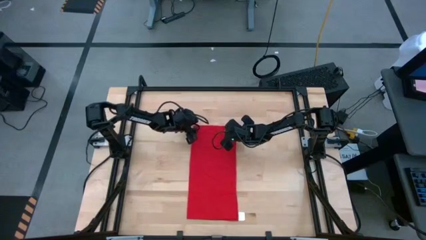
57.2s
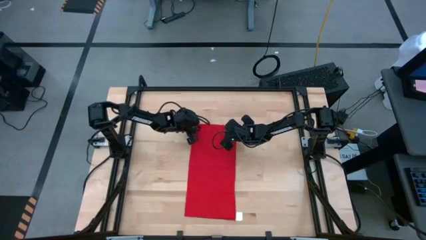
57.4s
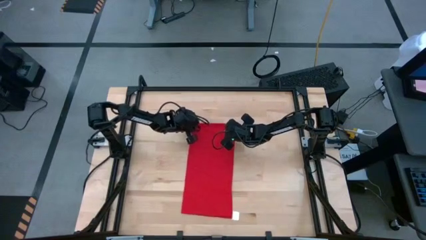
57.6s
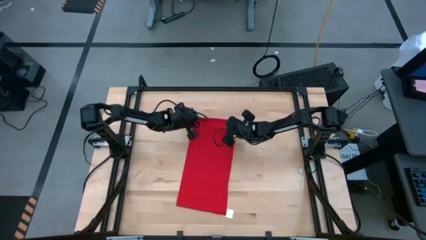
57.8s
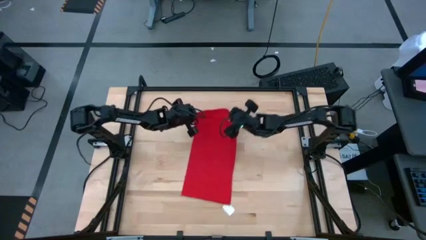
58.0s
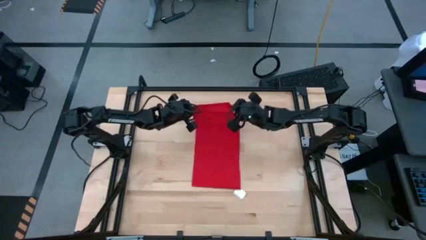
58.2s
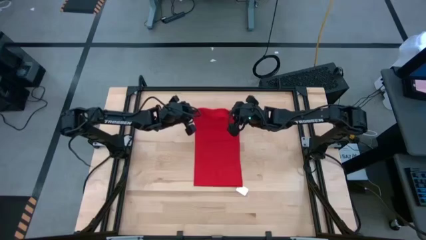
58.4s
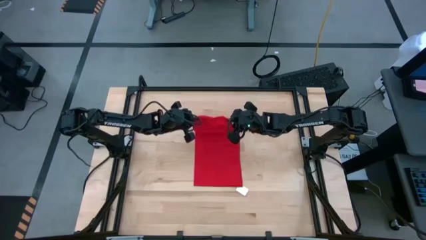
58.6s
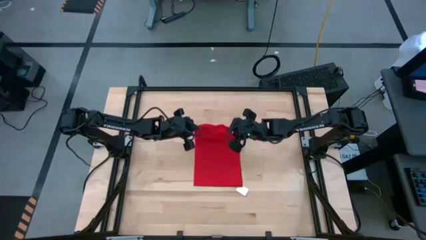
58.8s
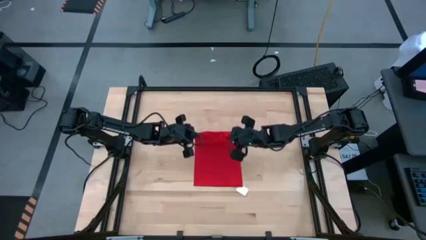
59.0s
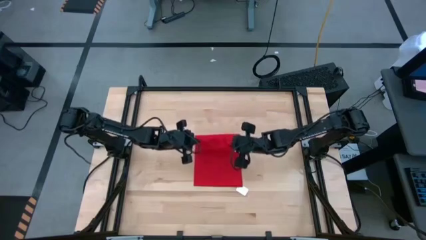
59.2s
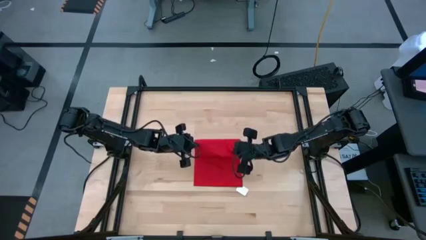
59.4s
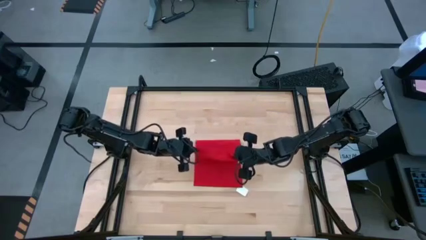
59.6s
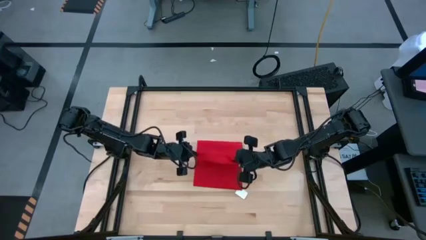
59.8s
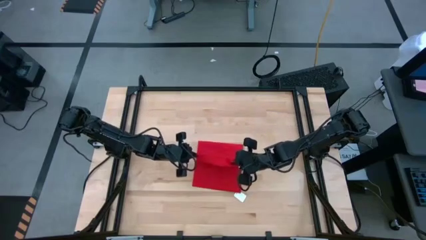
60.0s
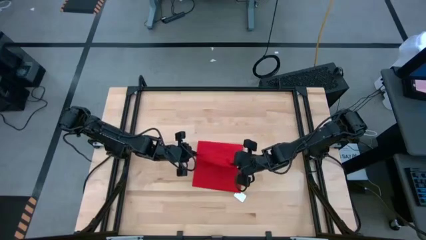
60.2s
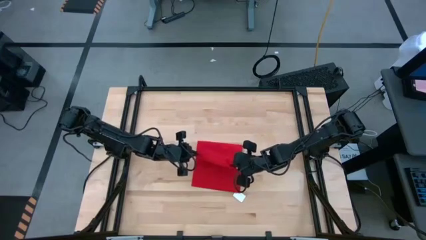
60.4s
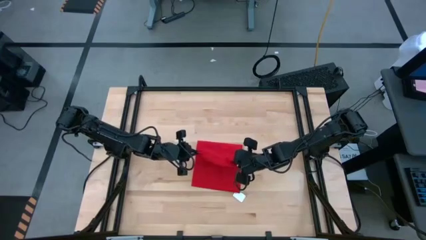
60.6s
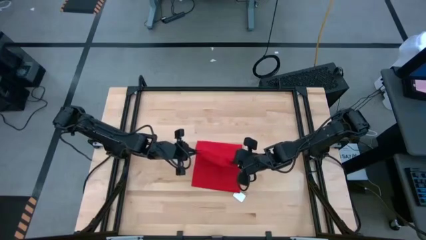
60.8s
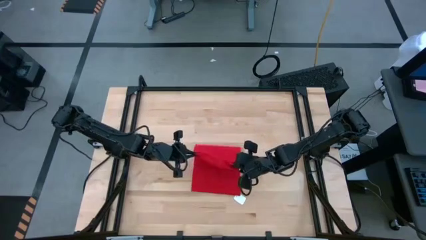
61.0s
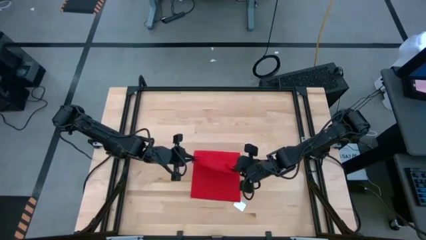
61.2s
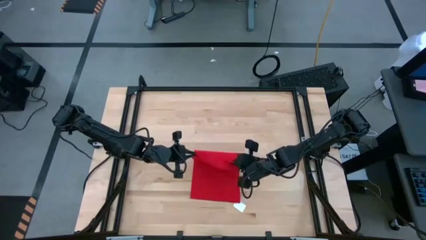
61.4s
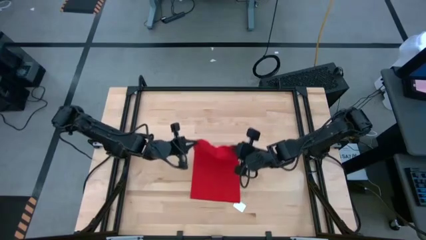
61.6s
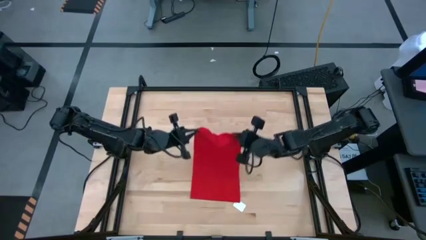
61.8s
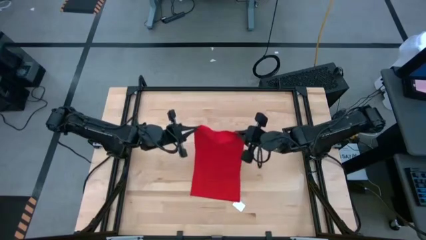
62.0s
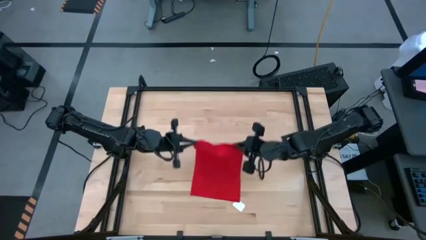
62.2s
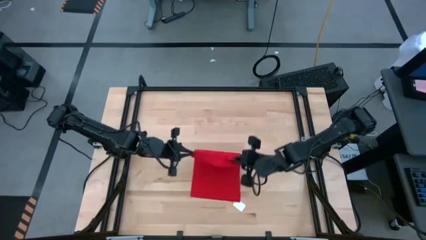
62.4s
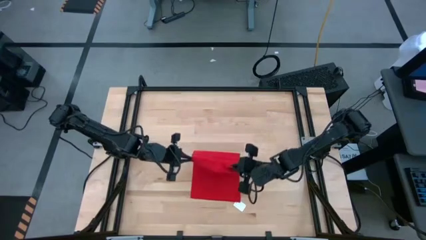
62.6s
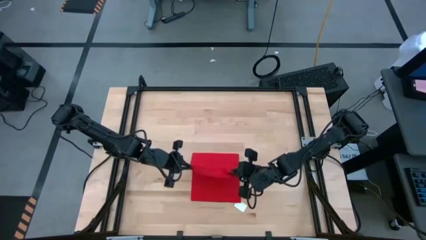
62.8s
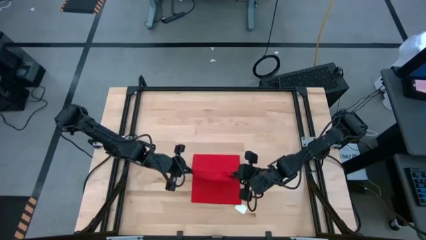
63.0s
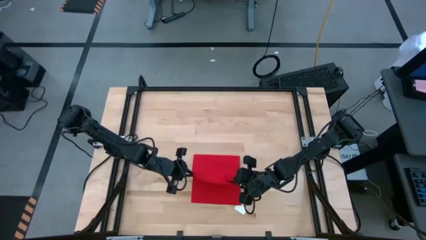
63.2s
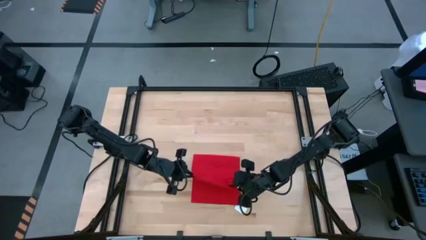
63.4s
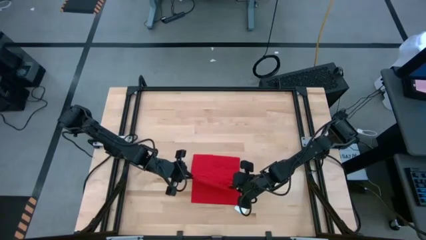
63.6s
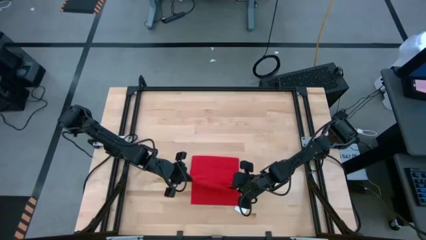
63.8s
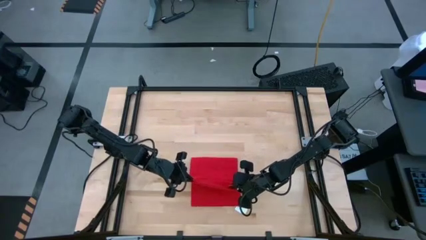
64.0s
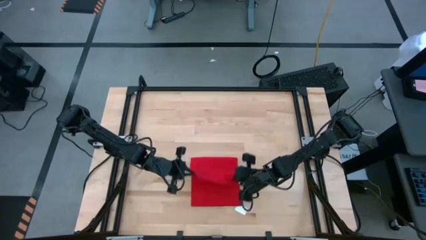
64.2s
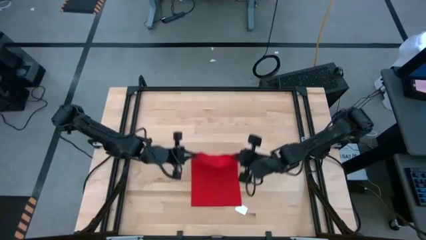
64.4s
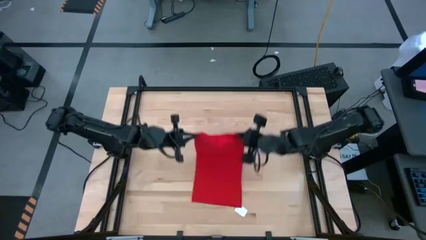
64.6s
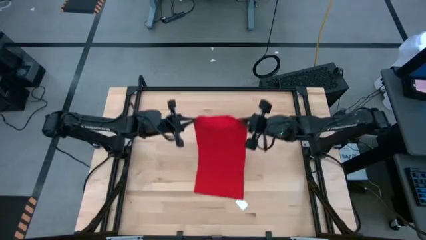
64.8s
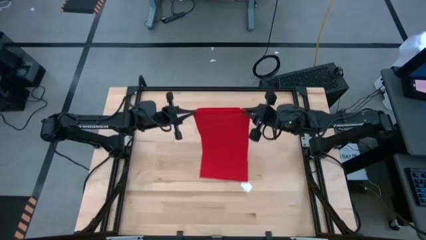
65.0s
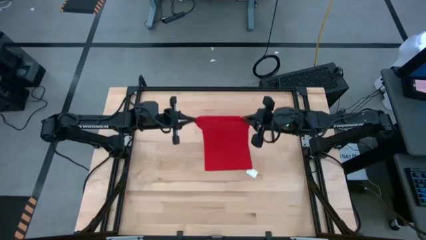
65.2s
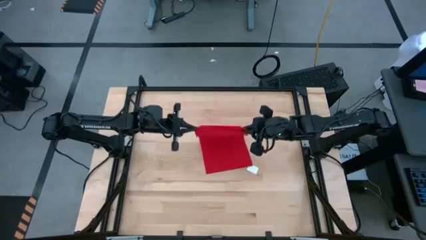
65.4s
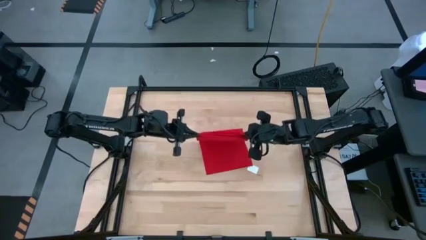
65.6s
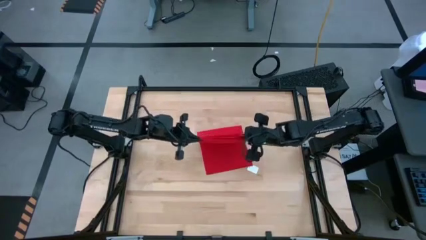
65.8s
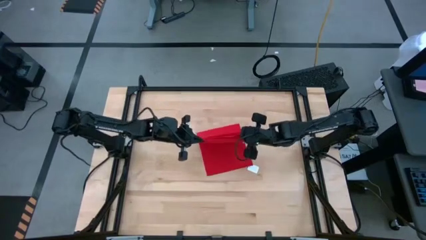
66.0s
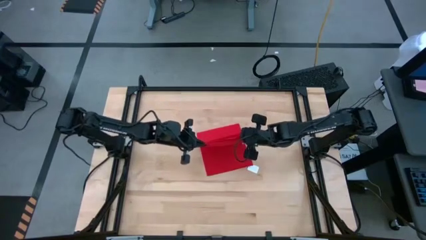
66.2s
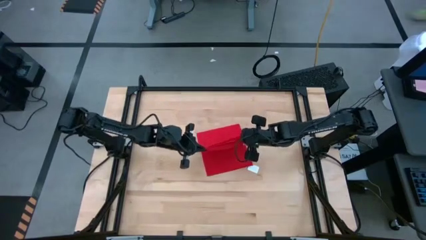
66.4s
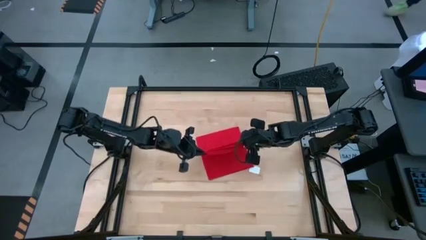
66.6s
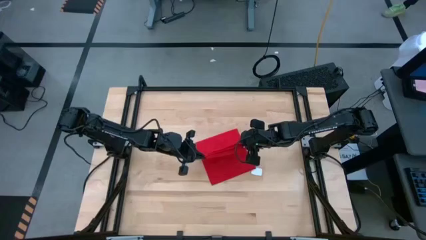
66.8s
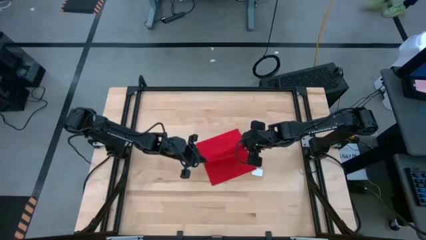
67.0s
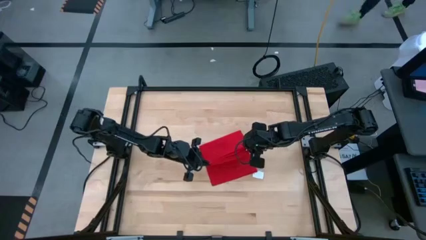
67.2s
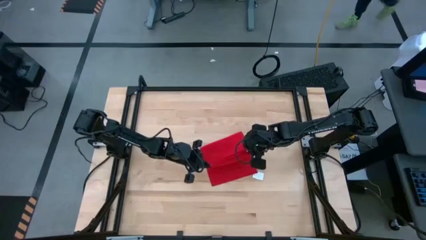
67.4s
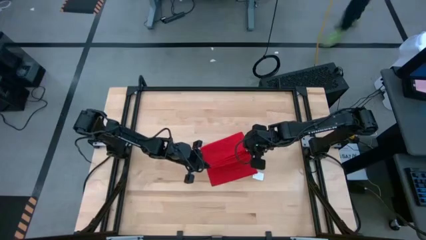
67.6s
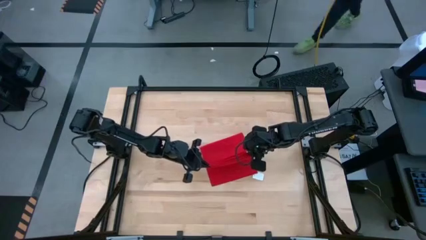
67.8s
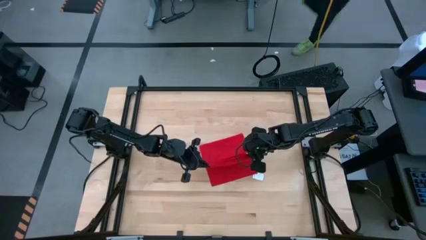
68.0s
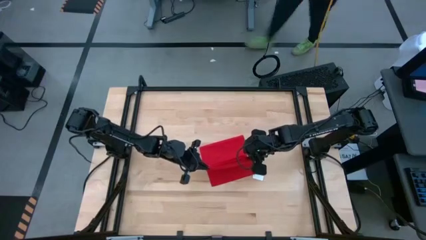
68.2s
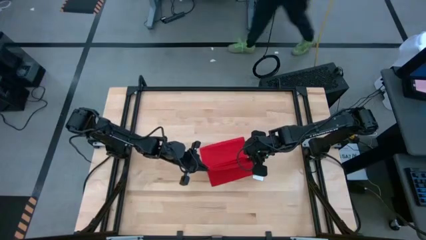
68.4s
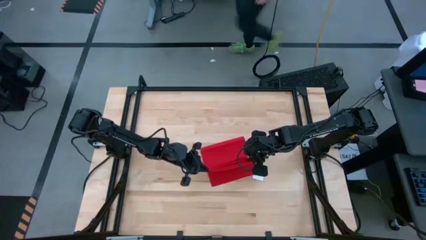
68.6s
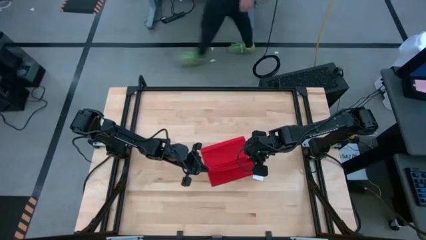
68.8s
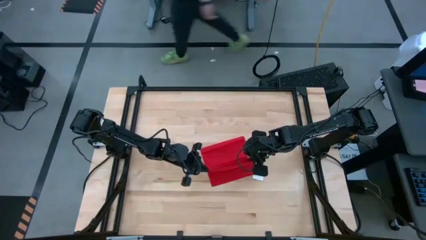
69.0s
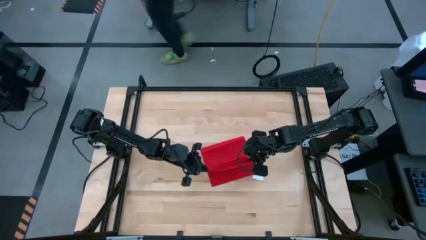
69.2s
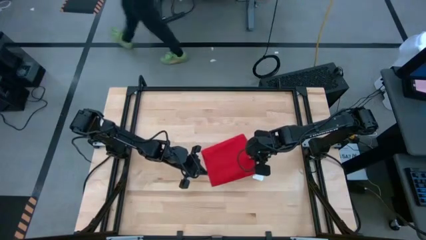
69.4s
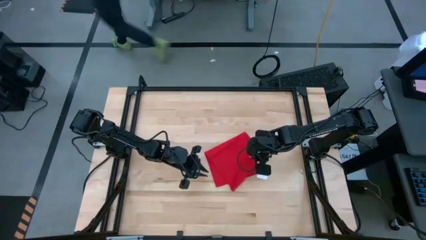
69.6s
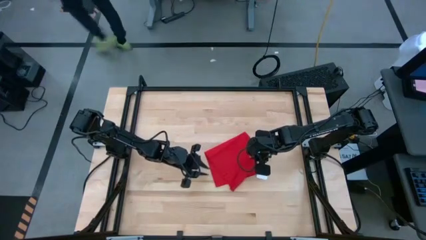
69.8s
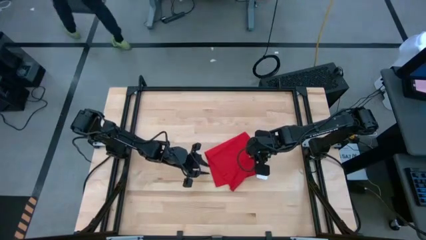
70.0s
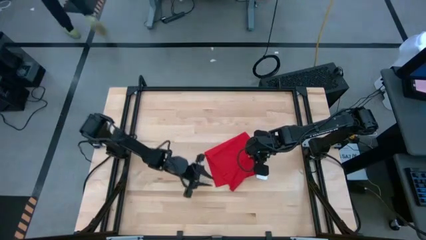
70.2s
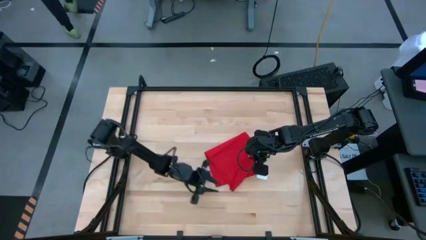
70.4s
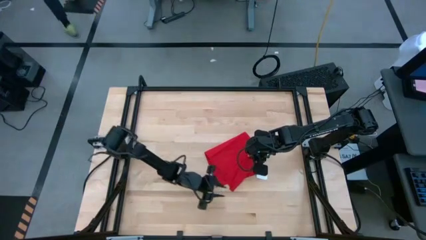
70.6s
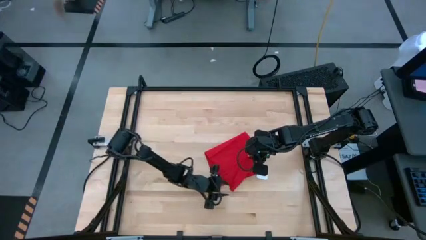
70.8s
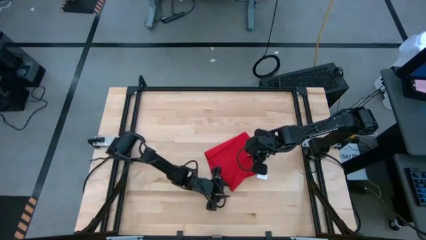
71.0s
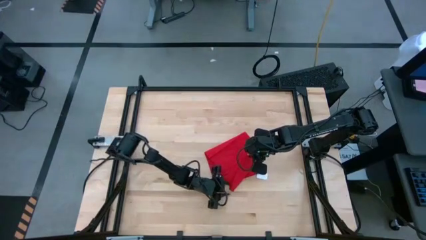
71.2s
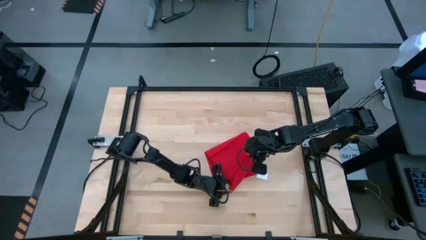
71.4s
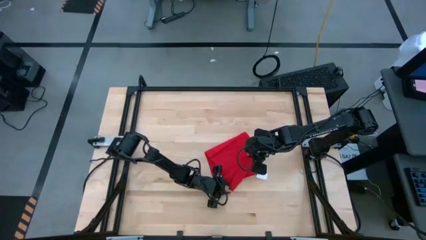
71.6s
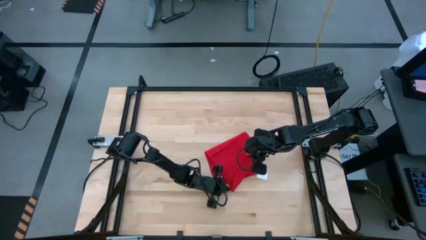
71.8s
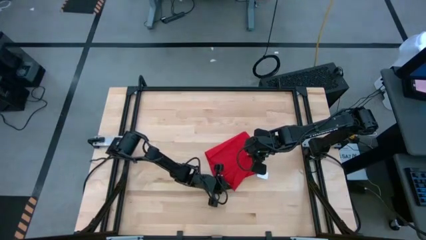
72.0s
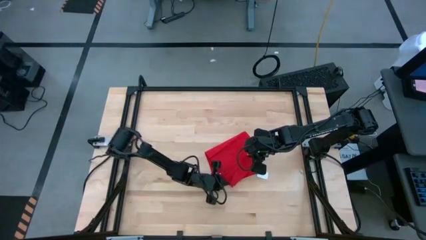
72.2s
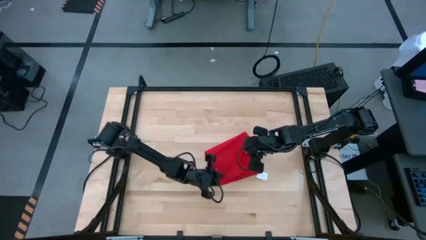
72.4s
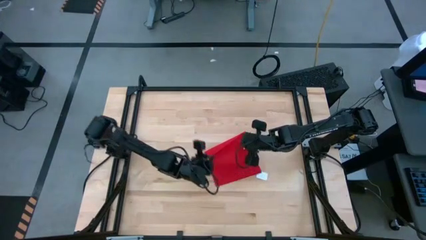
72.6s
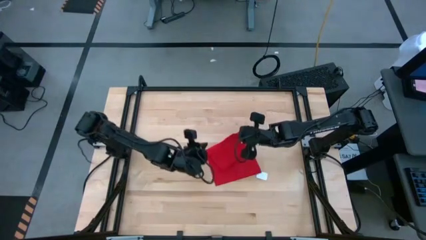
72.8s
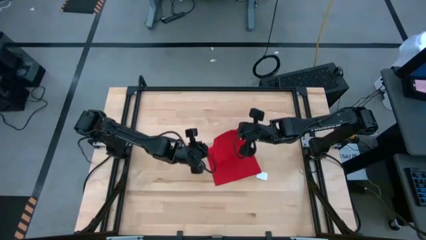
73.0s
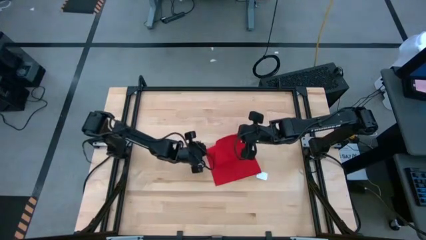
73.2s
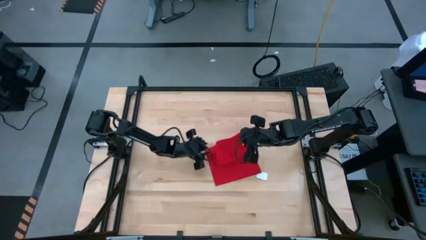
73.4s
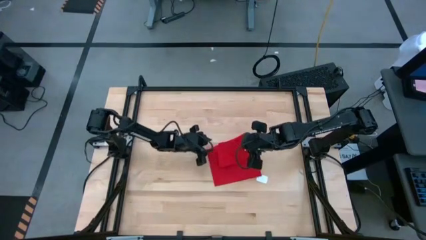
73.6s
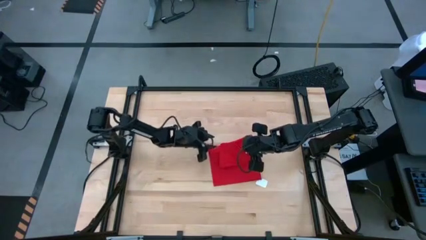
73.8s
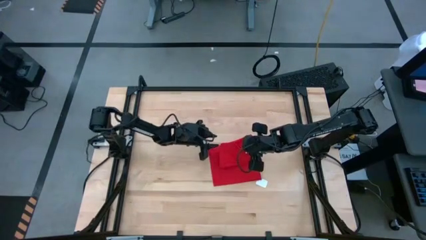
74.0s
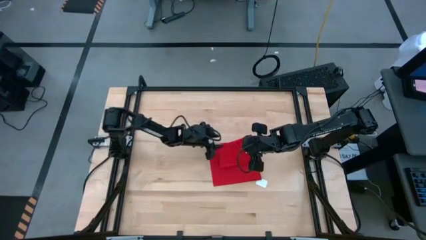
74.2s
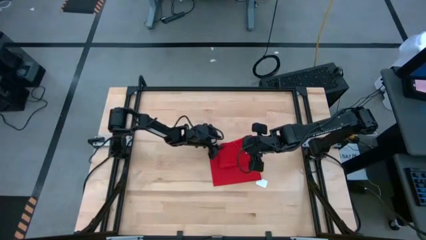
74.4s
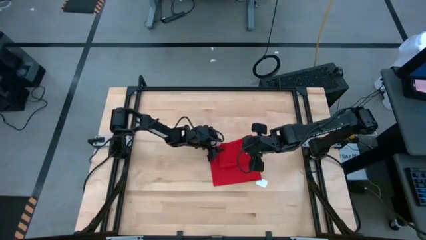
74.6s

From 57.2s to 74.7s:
Task: Roll napkin
Fold the red napkin
